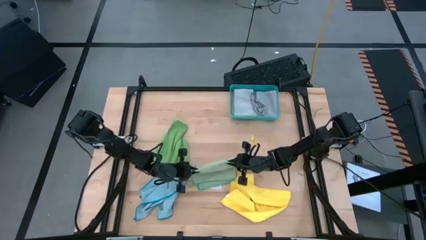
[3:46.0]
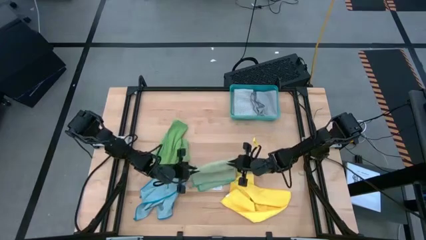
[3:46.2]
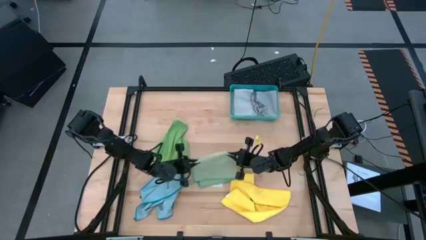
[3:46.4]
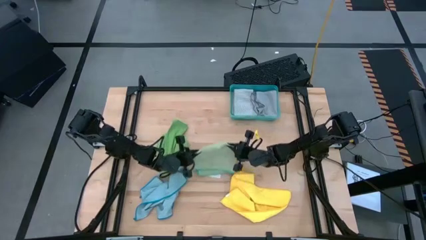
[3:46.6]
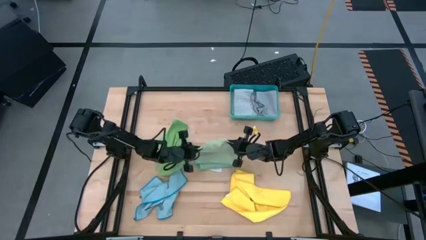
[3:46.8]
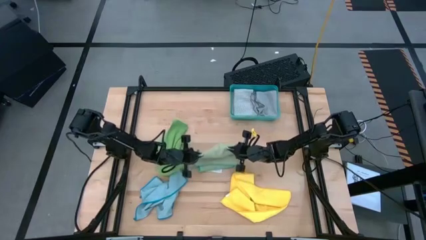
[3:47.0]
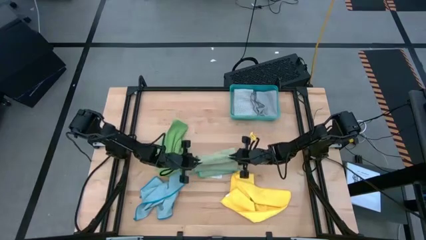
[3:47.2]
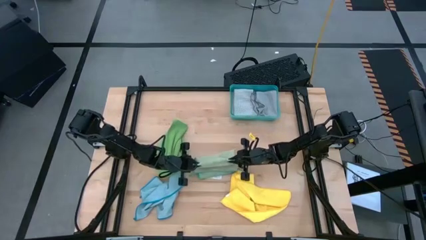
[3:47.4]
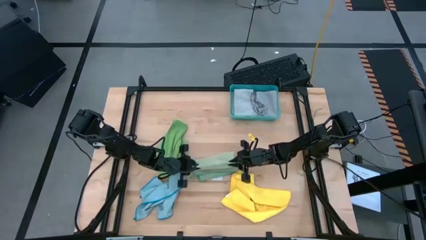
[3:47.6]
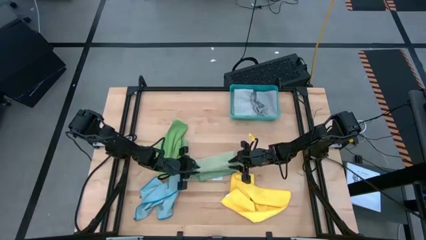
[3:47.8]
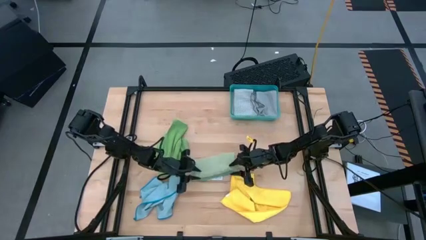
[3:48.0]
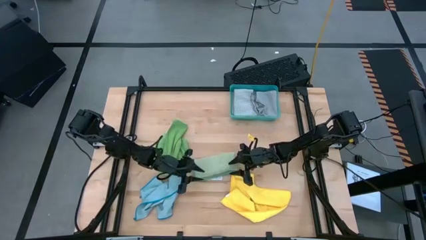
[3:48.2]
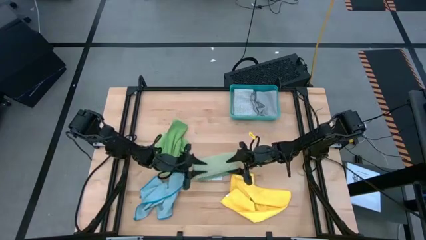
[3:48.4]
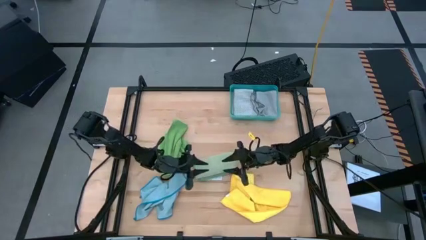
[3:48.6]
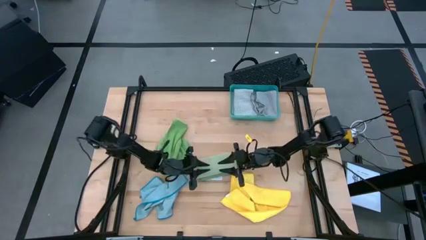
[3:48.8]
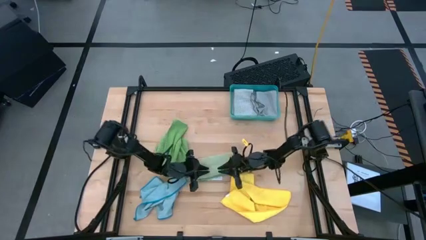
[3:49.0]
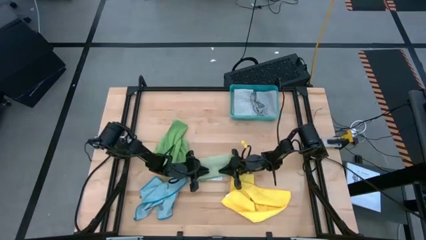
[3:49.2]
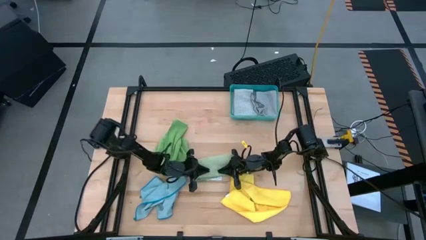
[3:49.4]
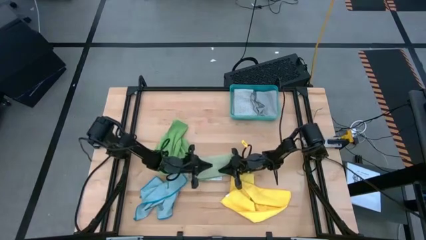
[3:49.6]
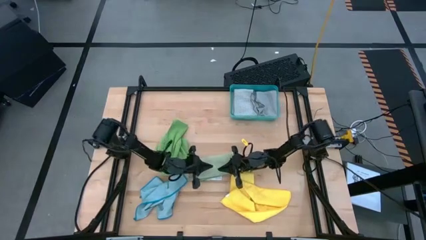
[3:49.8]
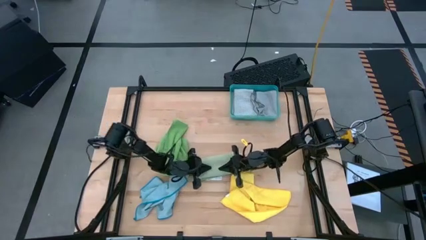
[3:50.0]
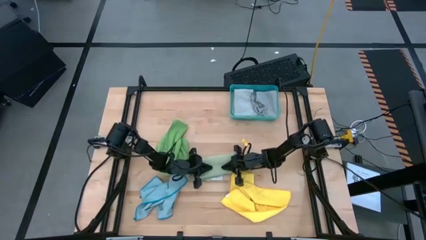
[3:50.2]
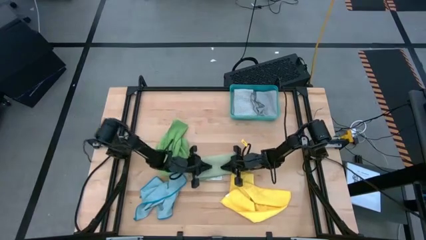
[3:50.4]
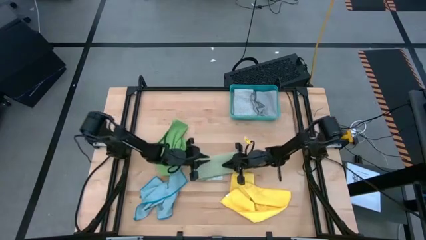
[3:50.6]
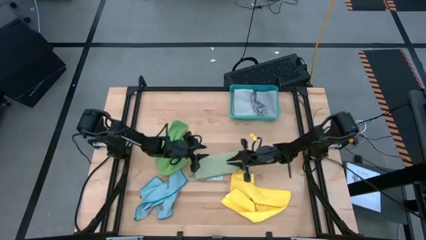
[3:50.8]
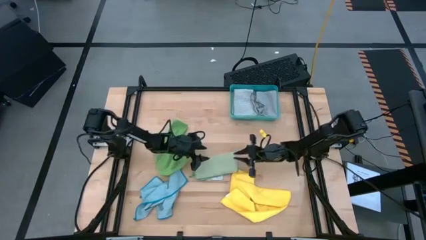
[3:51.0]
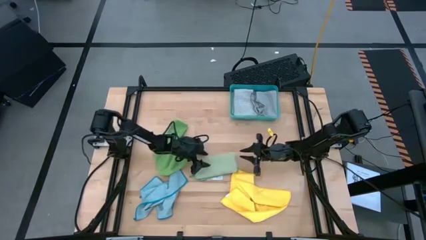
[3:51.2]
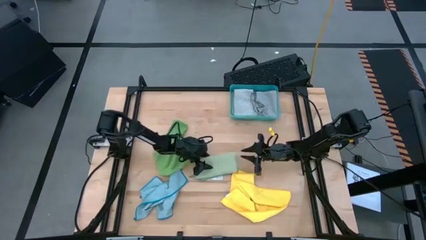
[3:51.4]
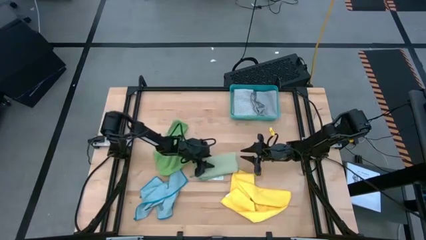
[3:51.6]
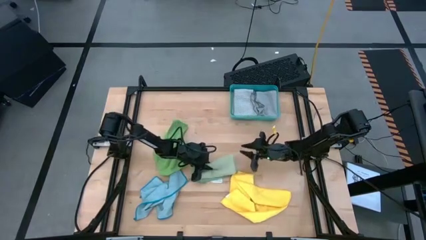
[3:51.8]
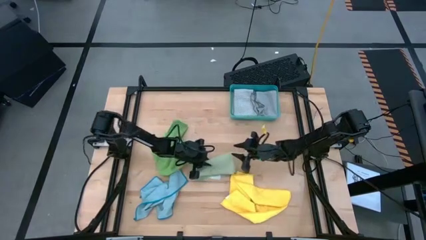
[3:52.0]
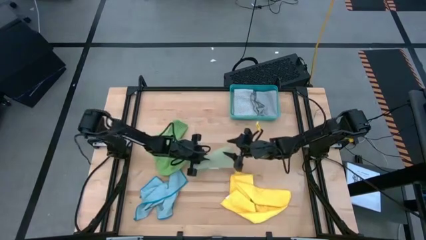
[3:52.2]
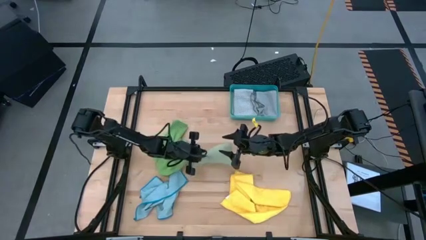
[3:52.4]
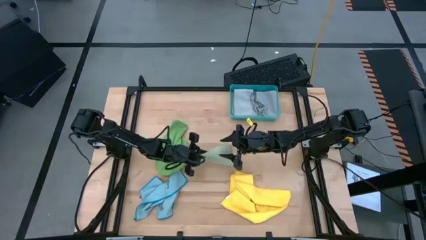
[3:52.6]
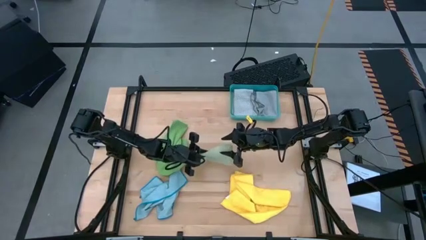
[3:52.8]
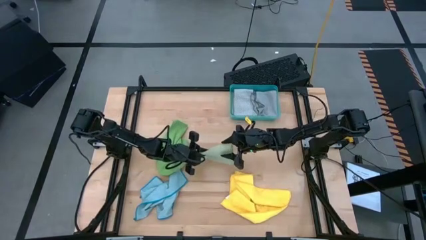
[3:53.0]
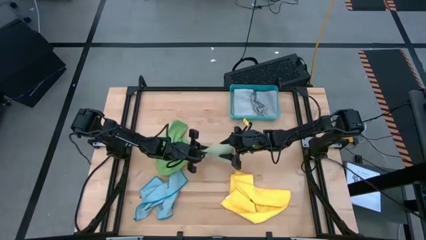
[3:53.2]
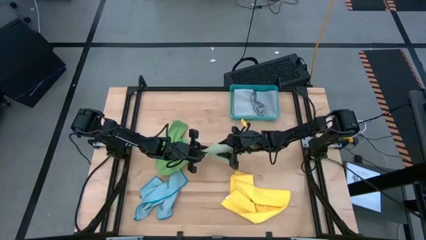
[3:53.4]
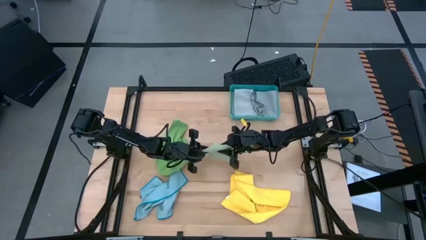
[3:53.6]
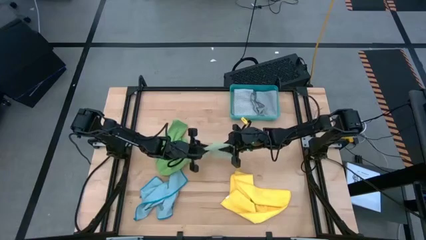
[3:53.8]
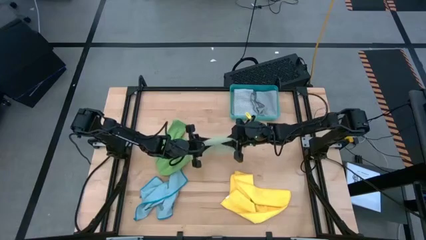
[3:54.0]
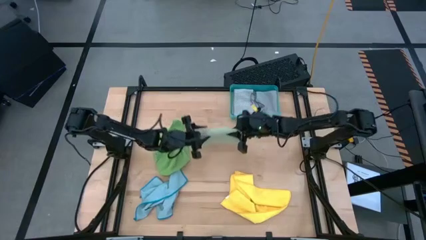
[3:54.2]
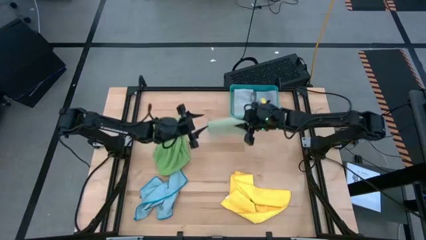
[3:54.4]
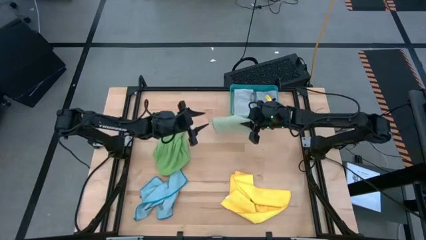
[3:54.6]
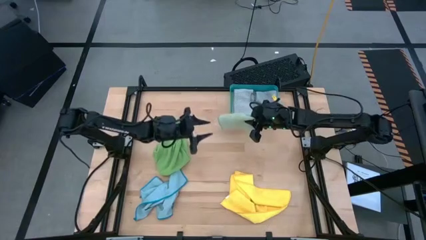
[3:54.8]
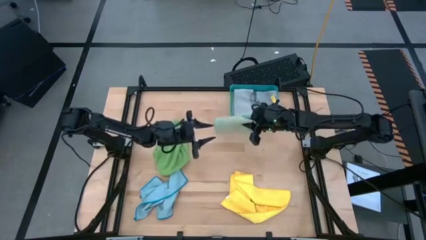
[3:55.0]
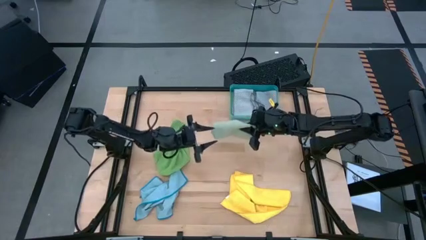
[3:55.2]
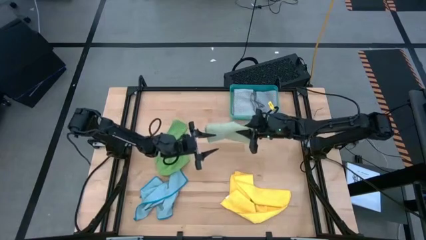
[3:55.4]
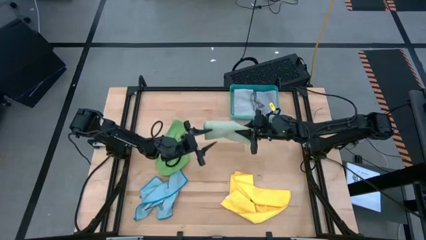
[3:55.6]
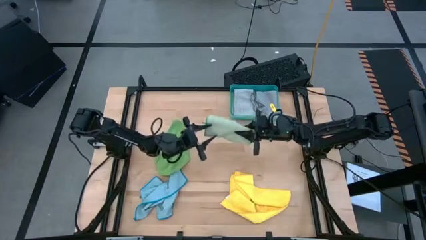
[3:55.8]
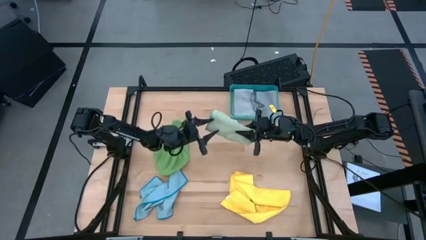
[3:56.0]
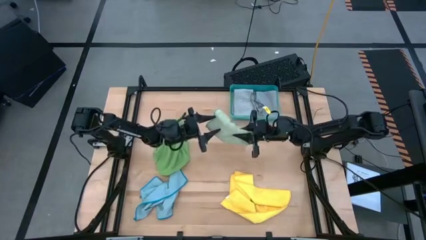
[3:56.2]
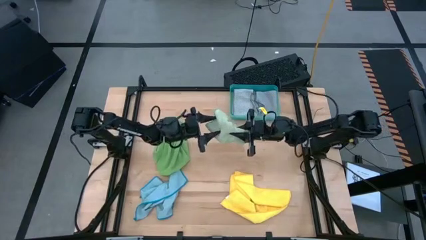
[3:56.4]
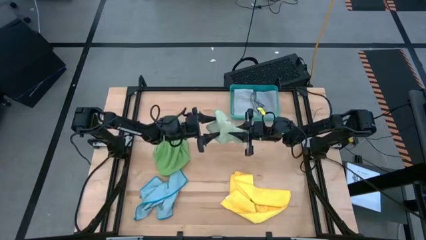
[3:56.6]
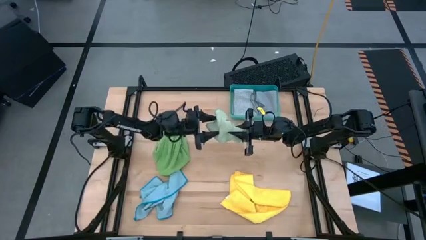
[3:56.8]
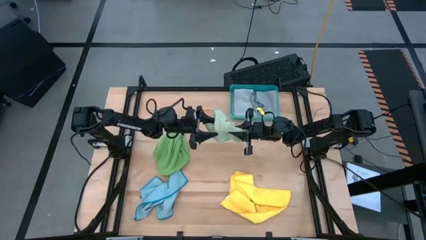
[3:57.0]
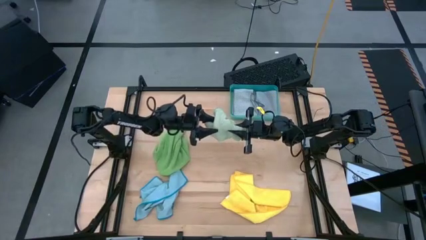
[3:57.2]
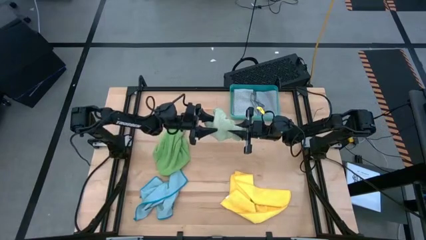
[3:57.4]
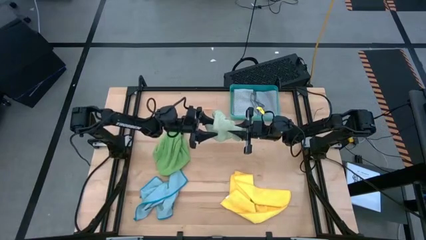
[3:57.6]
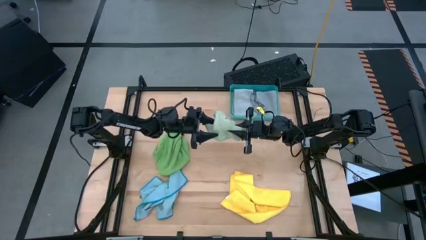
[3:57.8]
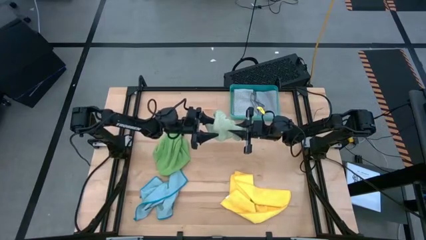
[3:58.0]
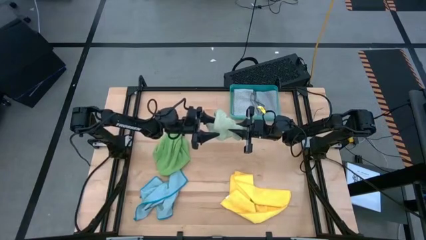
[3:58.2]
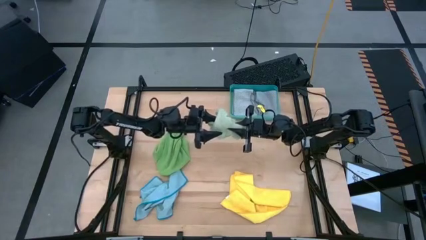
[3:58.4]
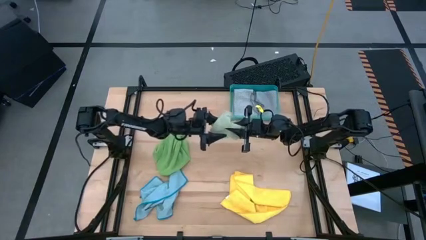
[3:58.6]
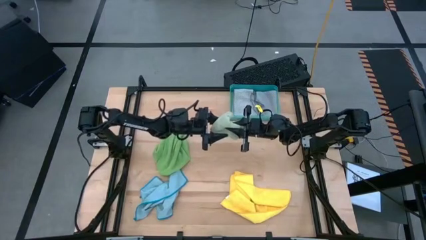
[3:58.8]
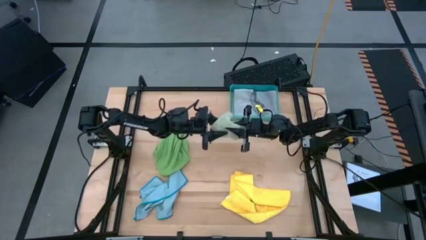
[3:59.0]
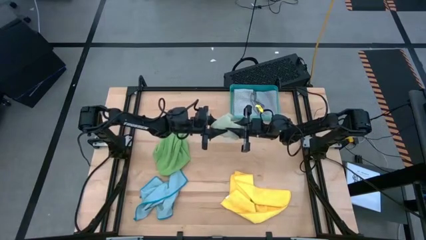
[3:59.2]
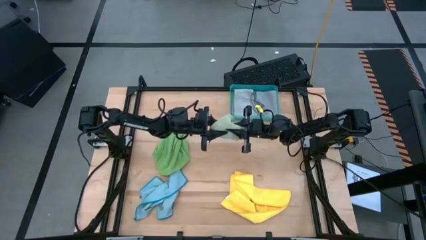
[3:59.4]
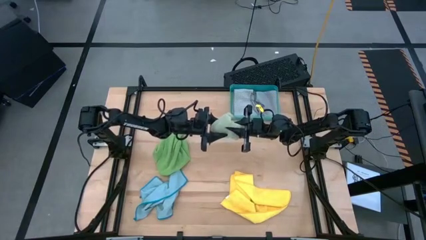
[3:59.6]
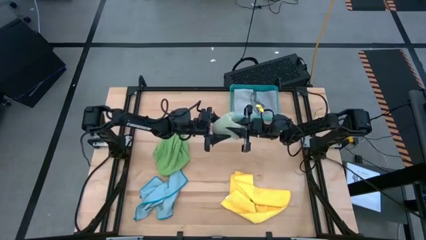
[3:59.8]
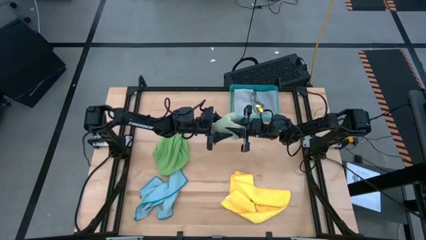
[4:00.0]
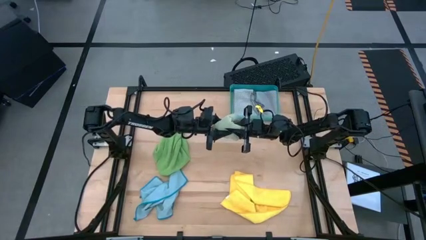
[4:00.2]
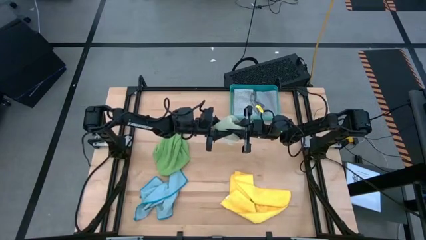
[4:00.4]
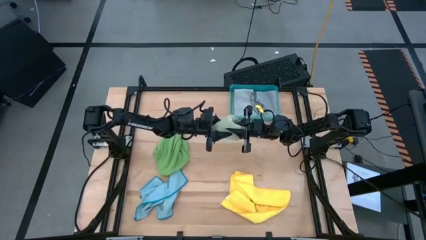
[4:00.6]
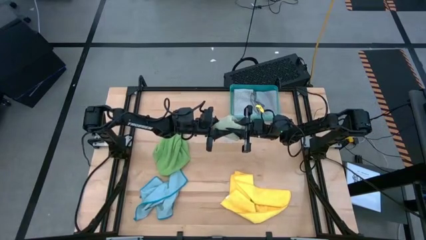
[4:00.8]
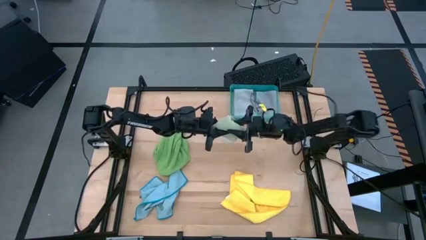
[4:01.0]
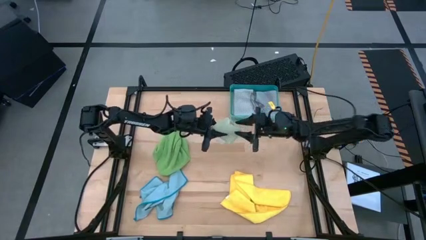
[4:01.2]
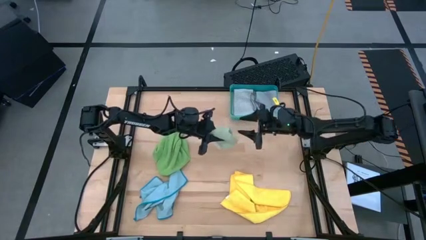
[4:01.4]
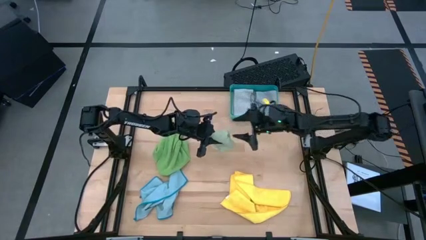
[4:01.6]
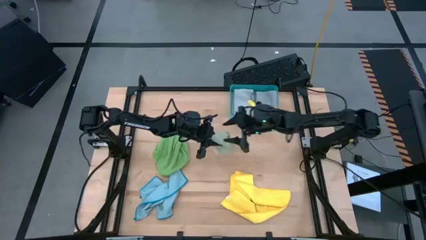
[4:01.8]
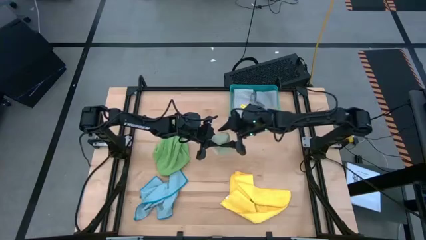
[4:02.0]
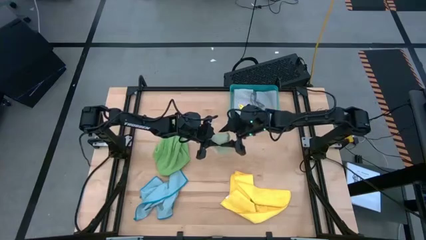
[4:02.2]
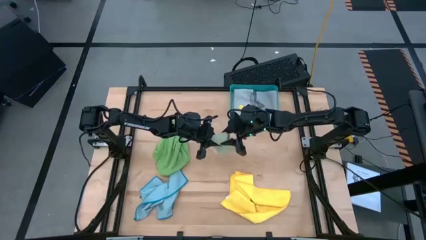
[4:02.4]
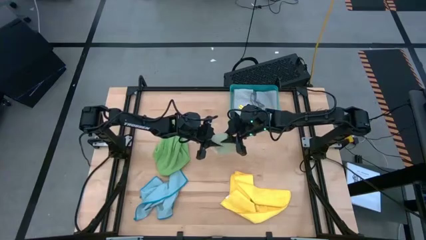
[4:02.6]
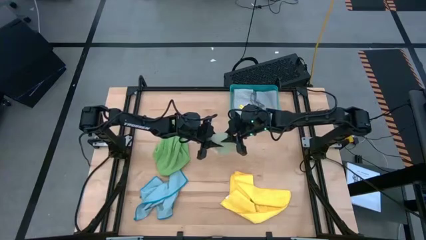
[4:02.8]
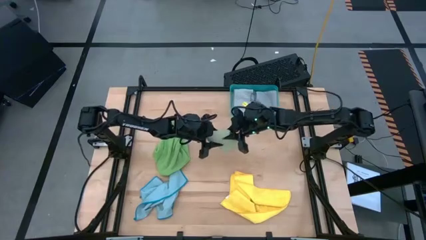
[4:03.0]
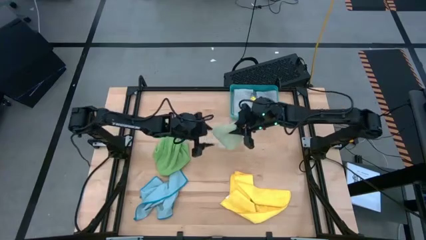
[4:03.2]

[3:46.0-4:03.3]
Task: Fold microfiber towels
Fold the light green microfiber cloth
